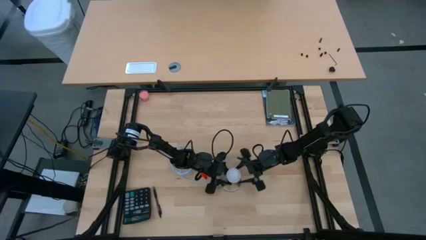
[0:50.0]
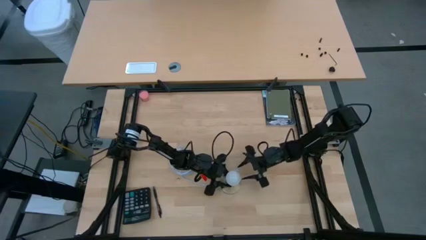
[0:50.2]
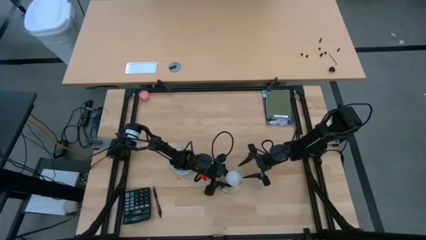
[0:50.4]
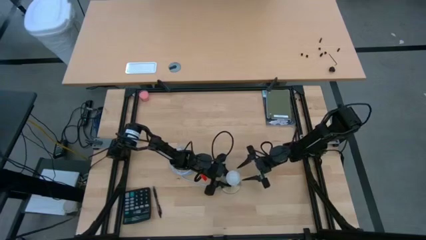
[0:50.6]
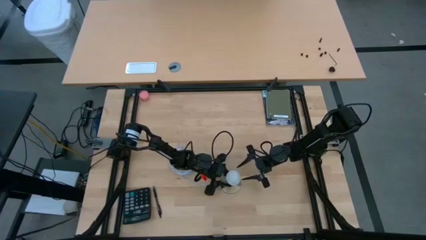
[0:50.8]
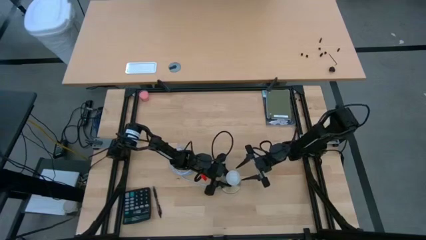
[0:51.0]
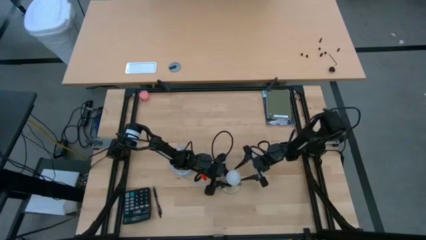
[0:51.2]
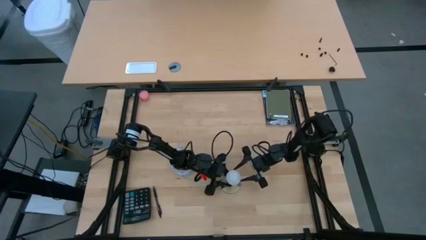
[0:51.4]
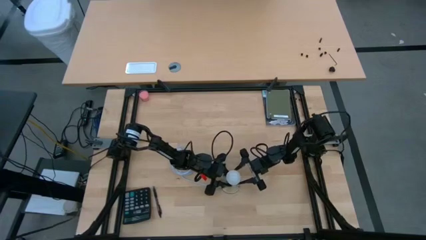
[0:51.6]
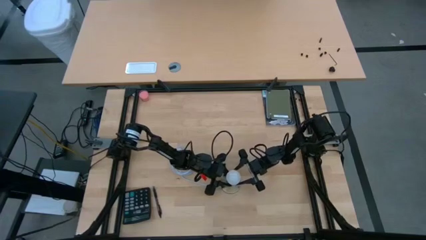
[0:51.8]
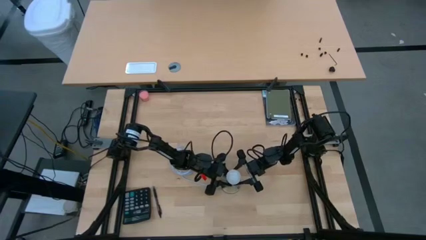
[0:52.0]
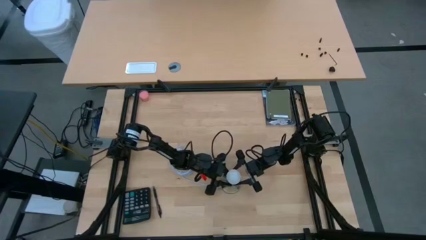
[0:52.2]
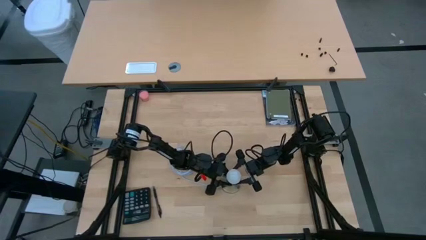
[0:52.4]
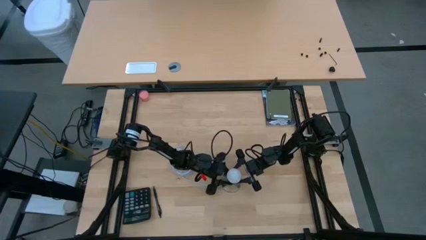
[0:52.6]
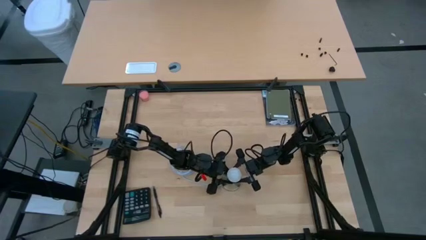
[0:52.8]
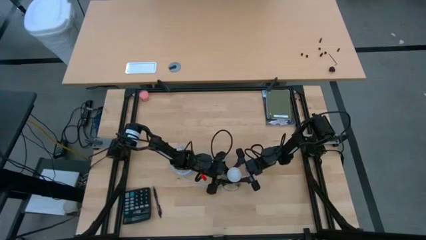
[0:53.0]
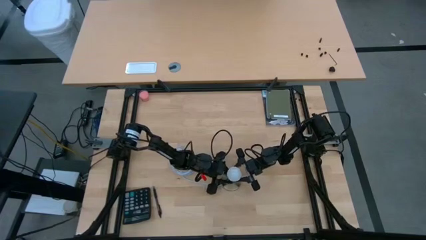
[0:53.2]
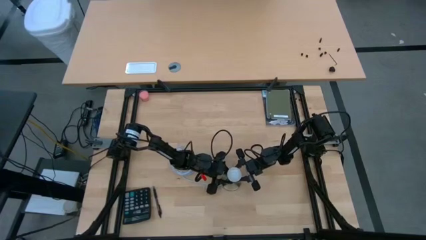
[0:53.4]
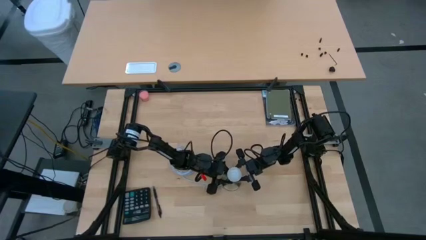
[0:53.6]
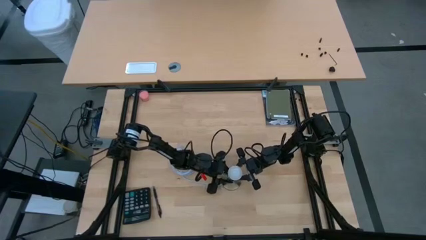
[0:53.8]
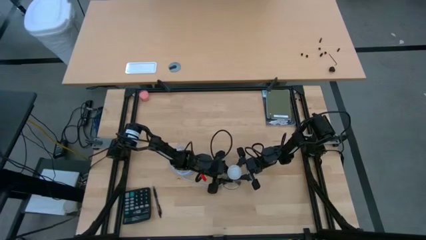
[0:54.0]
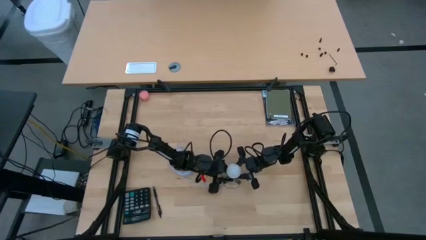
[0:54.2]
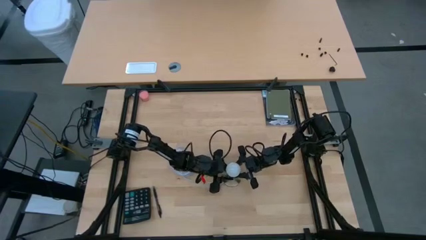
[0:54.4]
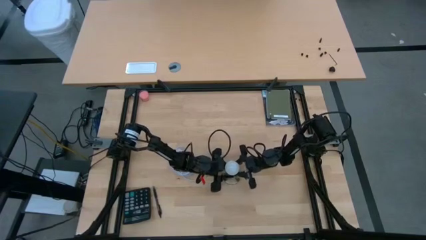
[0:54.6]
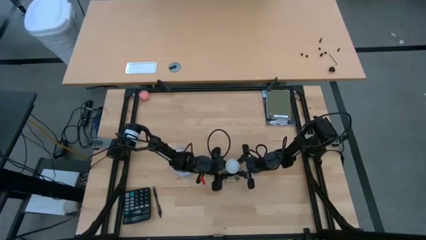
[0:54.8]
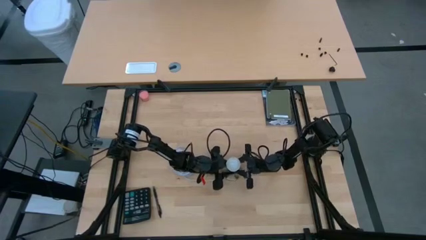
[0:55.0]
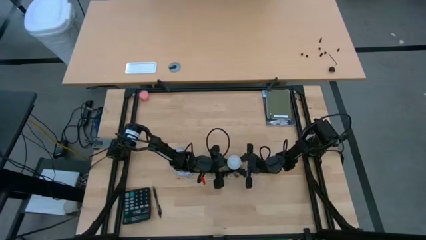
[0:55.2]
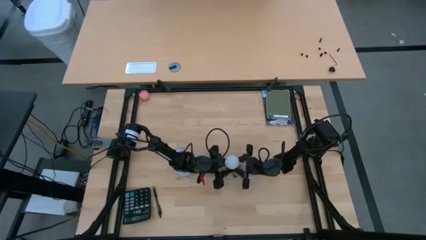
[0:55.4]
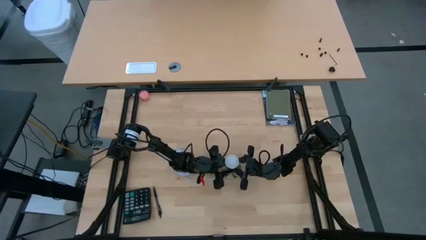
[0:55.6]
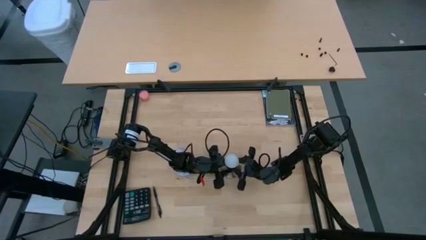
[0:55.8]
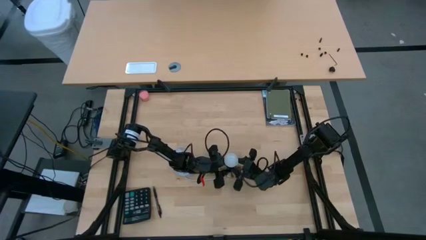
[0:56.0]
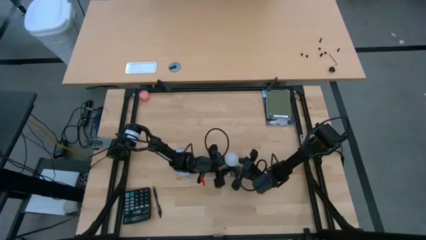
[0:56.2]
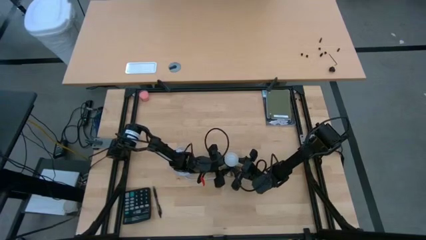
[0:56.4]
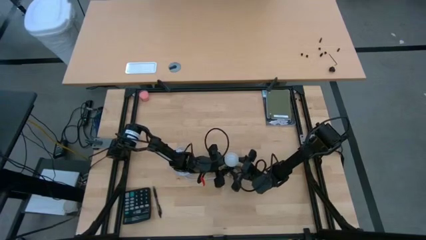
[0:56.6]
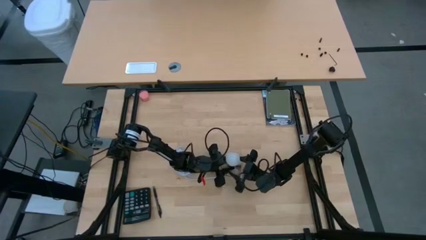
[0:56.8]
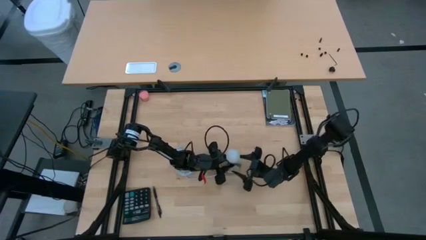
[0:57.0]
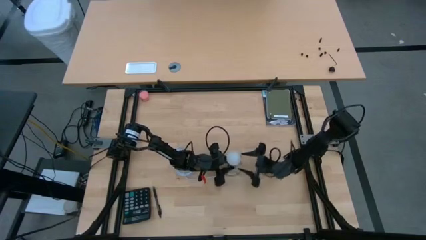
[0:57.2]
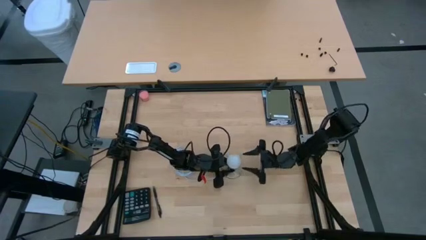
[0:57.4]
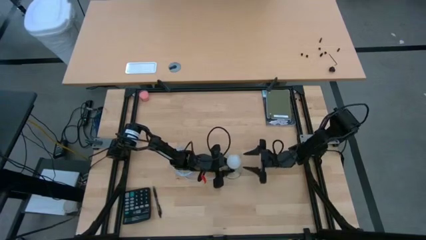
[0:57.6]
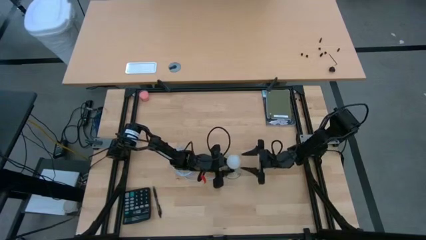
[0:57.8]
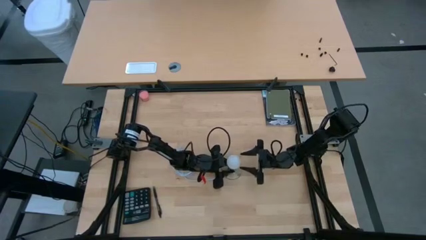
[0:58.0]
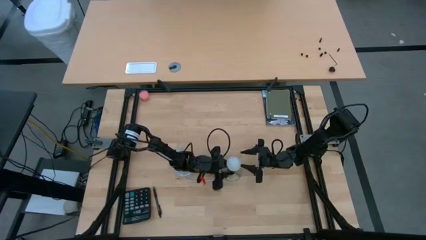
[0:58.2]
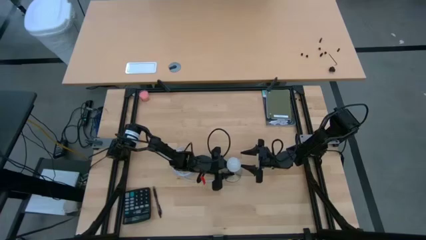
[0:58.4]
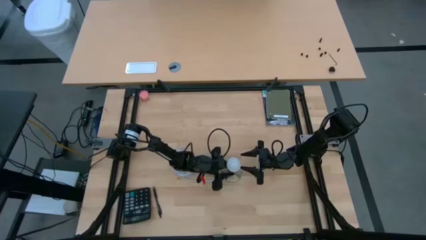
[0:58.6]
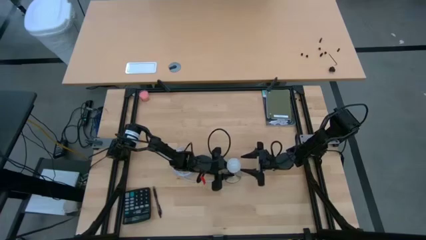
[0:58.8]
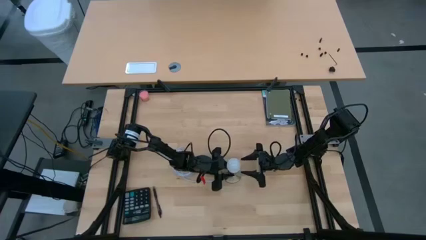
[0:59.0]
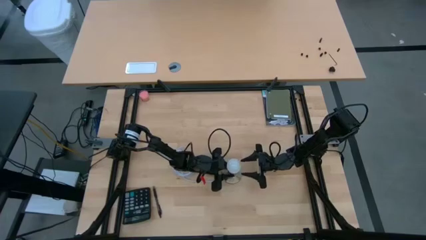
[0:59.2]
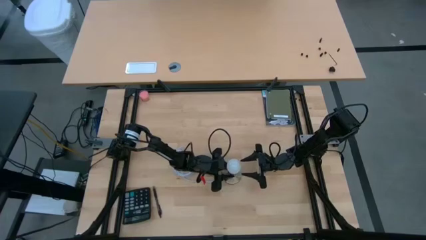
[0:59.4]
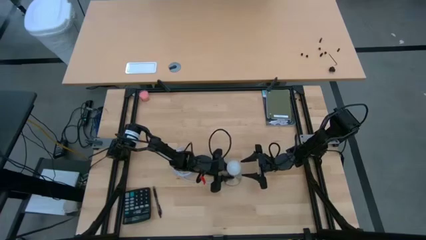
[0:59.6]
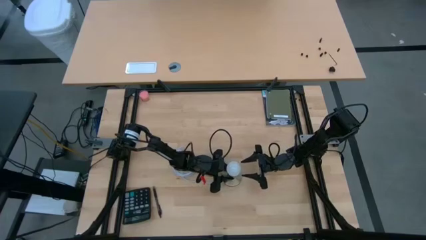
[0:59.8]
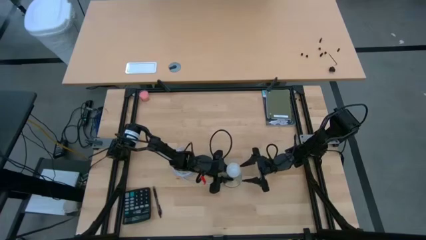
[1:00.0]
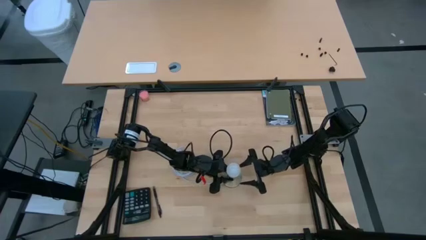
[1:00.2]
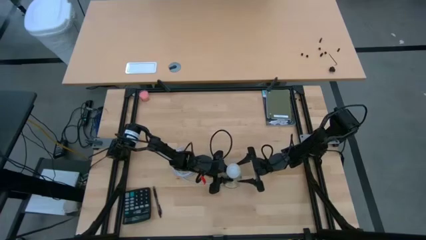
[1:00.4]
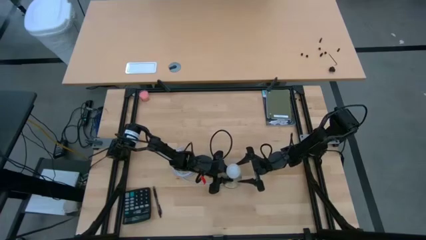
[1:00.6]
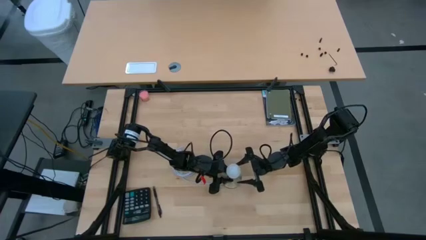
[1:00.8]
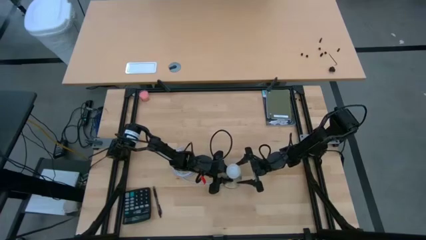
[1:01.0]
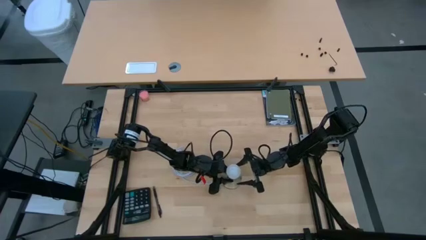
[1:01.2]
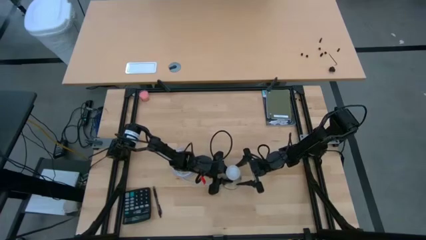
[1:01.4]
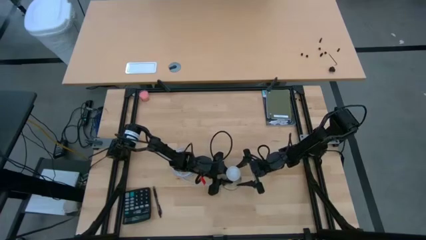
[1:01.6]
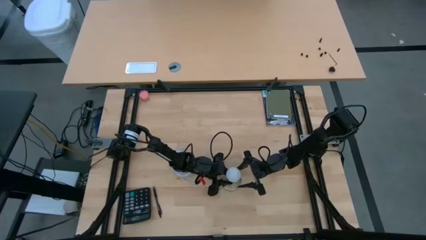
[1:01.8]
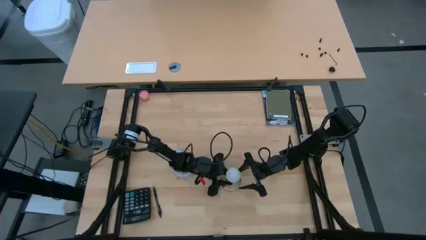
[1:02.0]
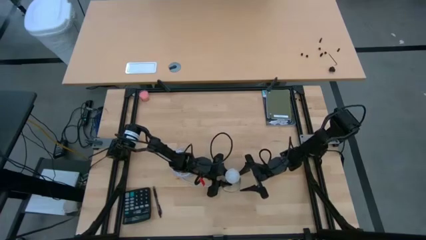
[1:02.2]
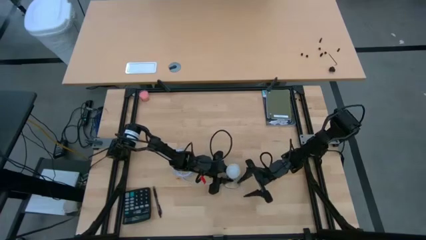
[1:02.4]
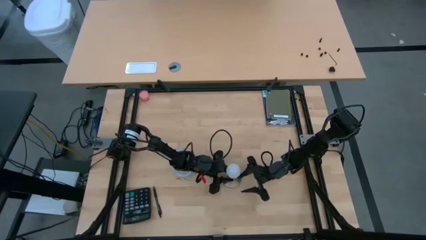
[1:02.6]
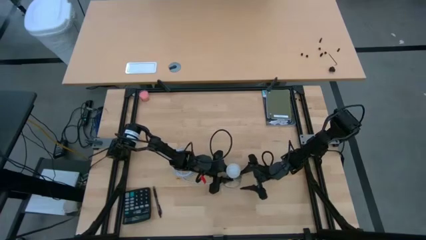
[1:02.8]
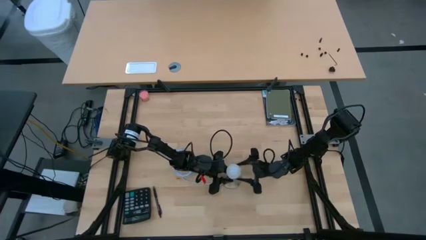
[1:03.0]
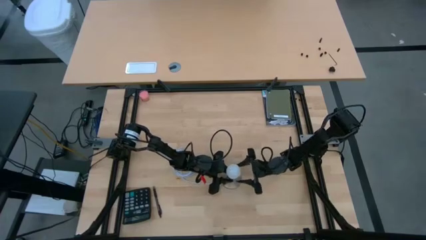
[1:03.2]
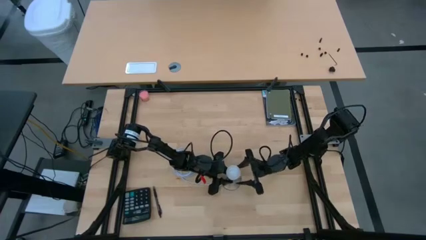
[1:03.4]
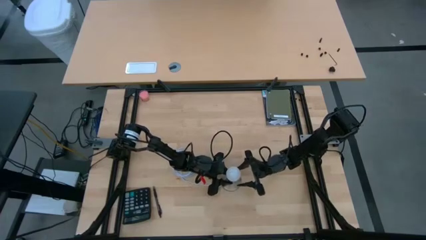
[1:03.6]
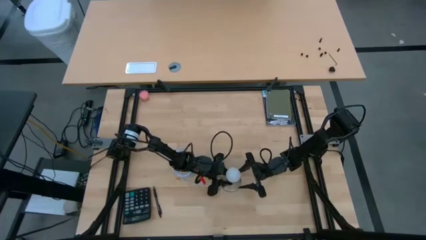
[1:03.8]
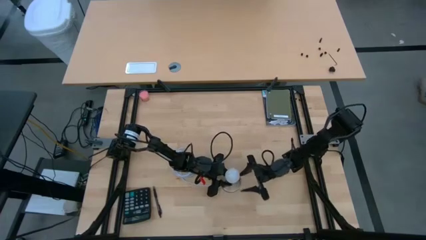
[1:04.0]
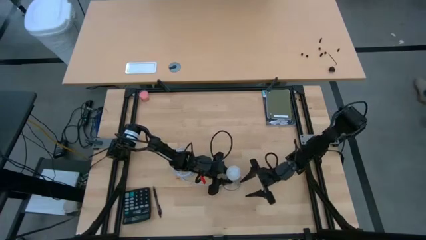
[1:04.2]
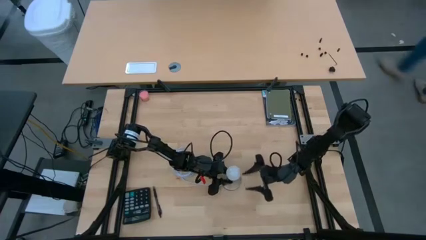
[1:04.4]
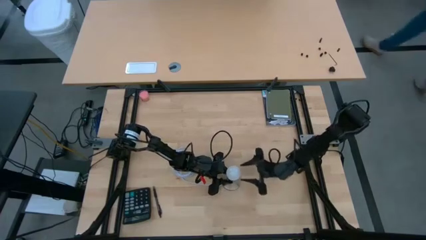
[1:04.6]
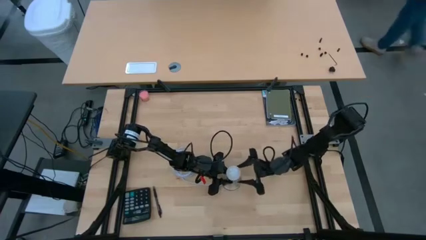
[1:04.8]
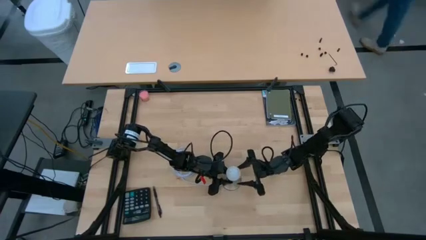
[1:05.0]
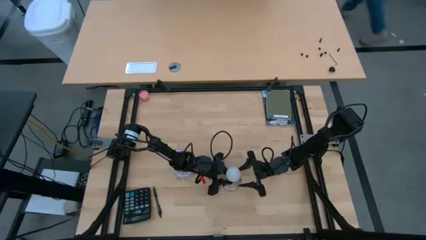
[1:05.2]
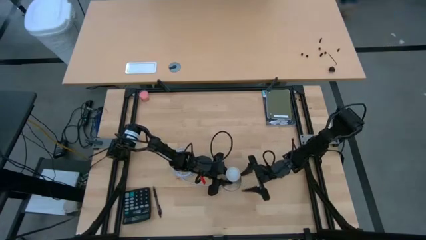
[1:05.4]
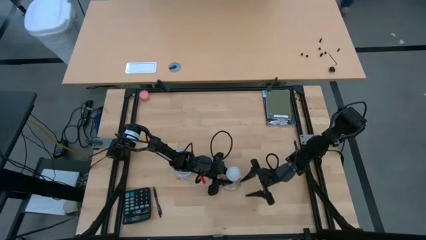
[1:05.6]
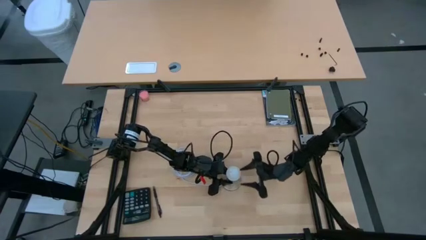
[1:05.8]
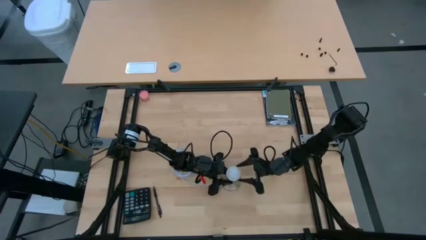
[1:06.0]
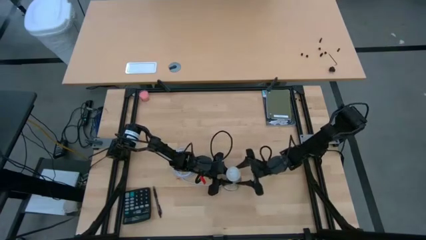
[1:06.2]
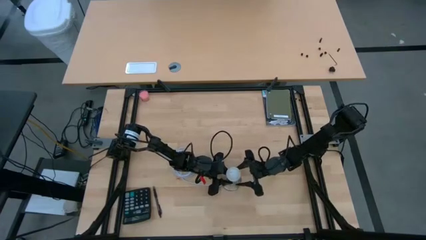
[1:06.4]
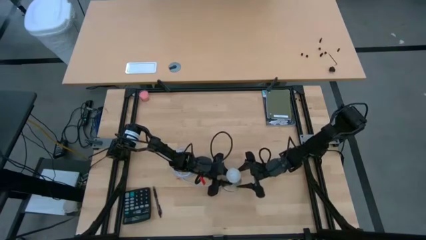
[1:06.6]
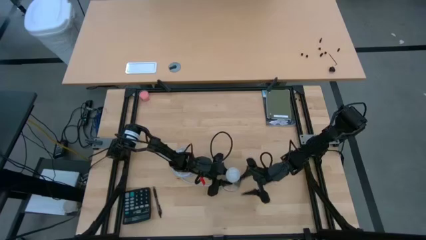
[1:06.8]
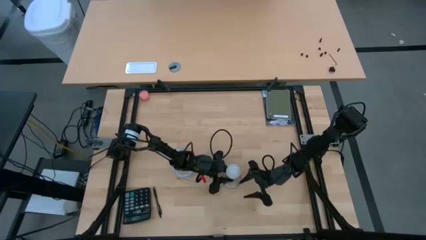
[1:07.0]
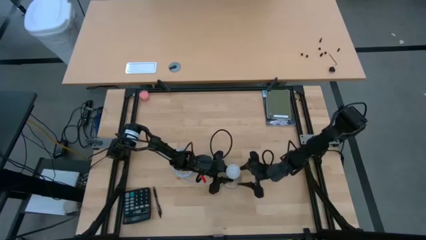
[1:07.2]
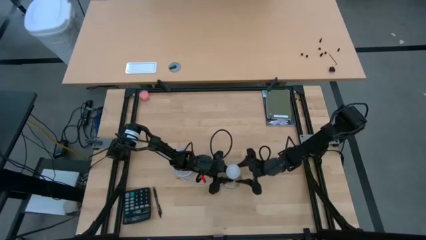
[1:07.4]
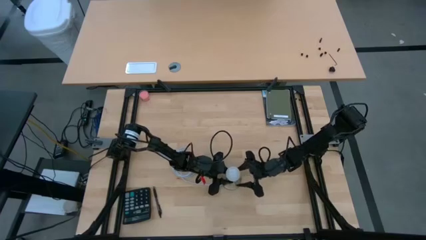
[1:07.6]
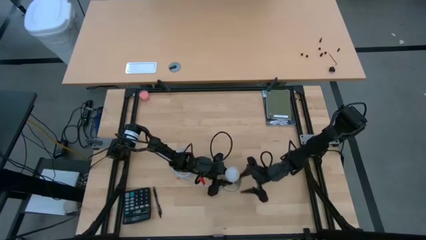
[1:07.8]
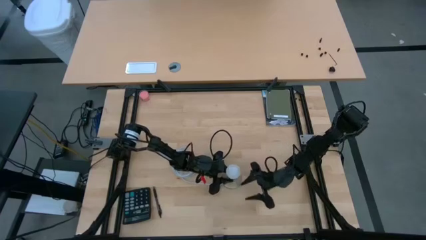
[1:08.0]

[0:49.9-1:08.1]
Task: Screw lightbulb
Insert the lightbulb into the lamp
